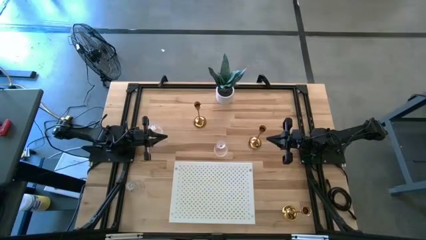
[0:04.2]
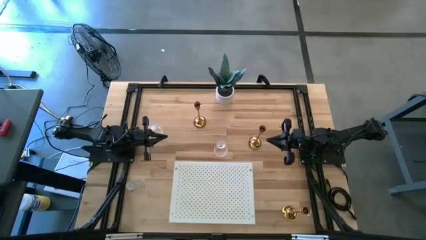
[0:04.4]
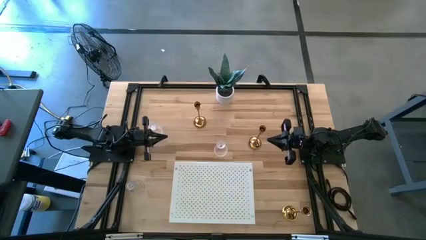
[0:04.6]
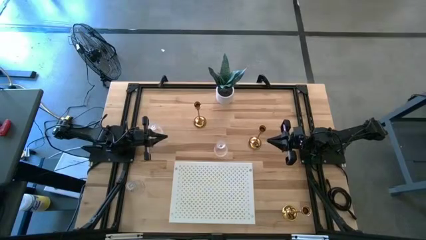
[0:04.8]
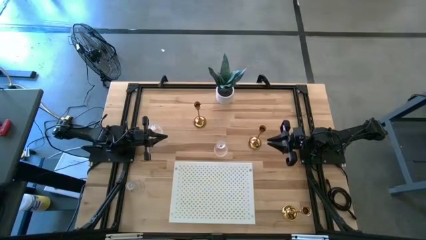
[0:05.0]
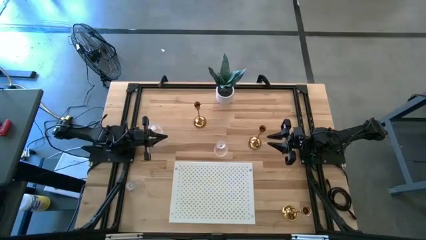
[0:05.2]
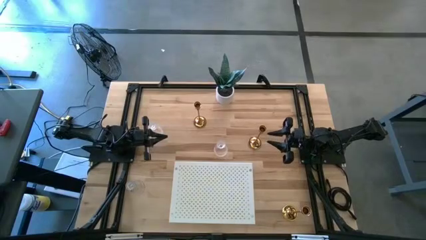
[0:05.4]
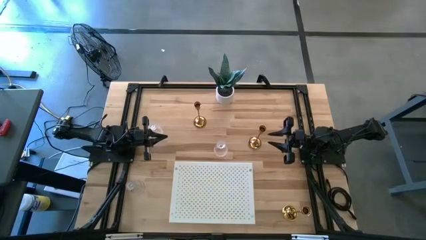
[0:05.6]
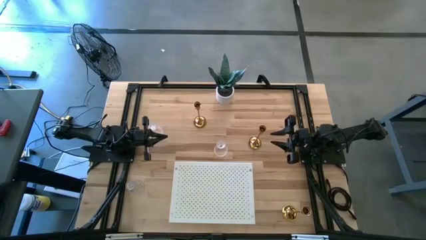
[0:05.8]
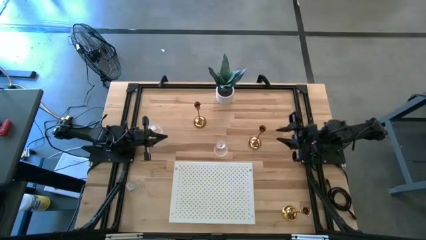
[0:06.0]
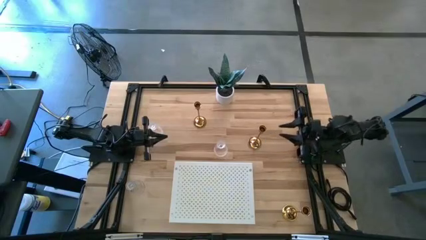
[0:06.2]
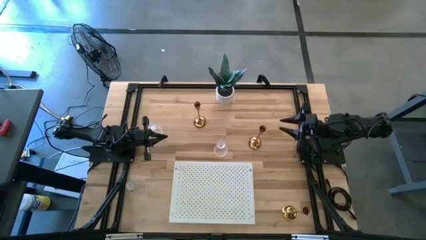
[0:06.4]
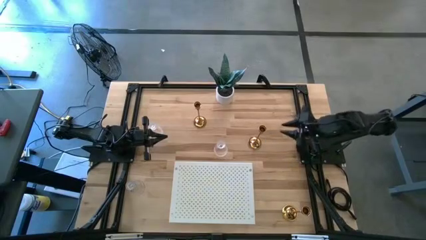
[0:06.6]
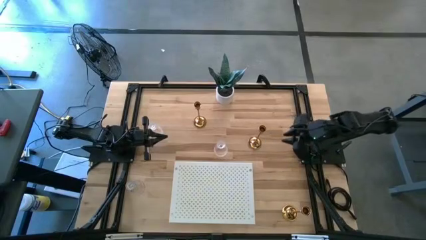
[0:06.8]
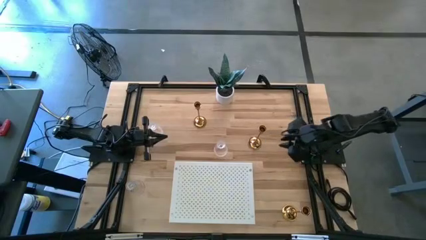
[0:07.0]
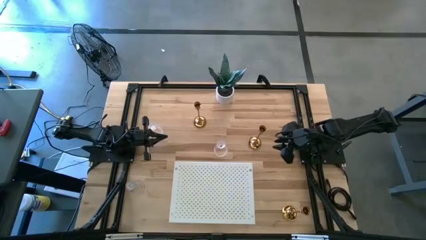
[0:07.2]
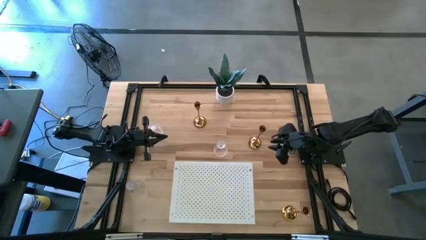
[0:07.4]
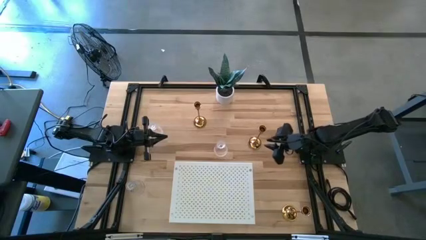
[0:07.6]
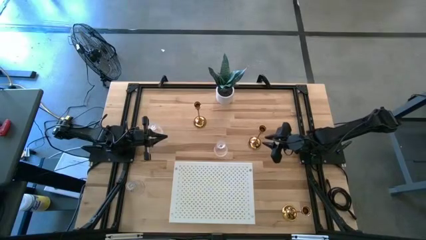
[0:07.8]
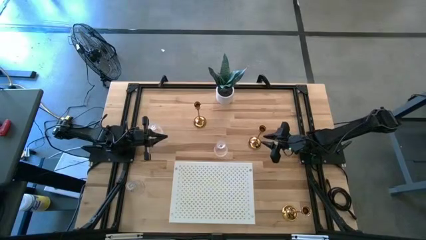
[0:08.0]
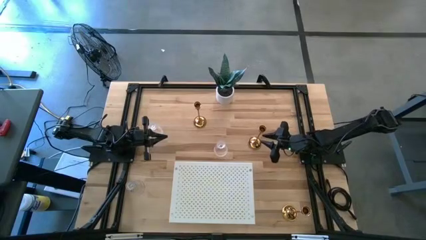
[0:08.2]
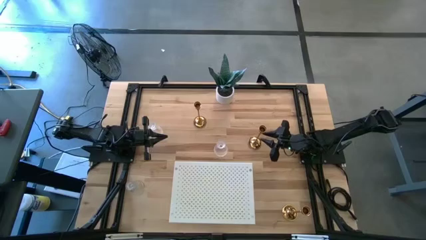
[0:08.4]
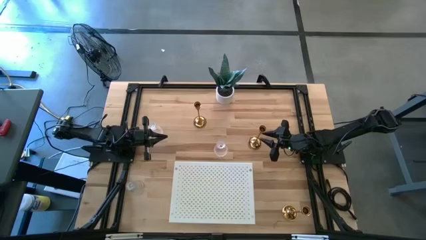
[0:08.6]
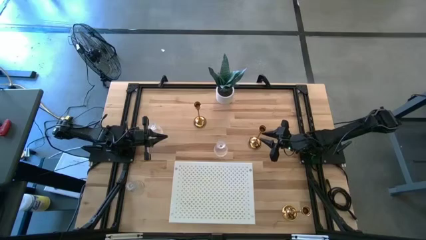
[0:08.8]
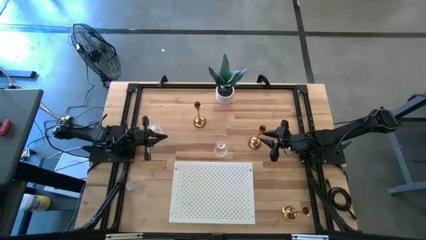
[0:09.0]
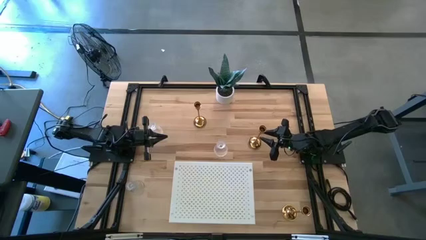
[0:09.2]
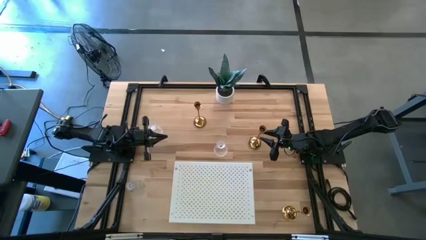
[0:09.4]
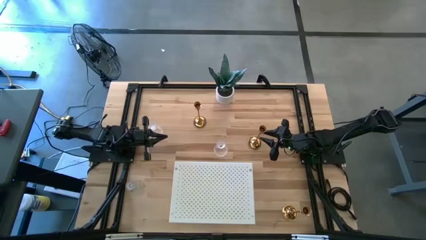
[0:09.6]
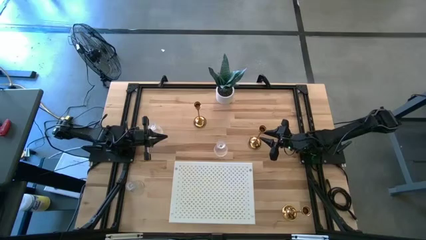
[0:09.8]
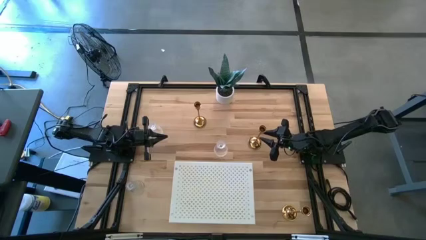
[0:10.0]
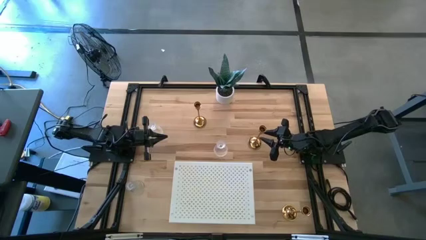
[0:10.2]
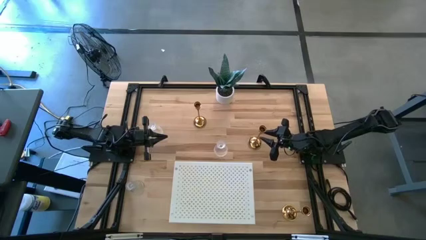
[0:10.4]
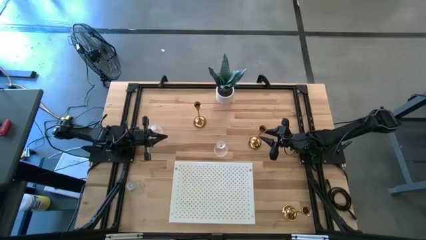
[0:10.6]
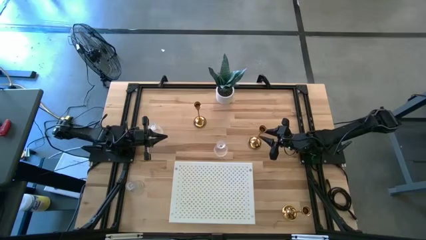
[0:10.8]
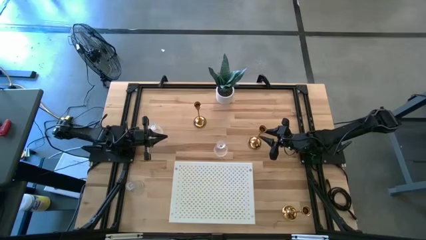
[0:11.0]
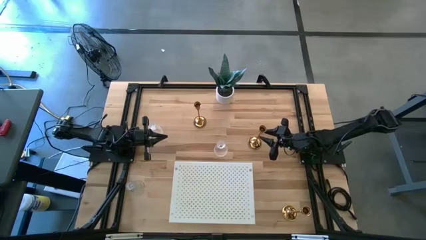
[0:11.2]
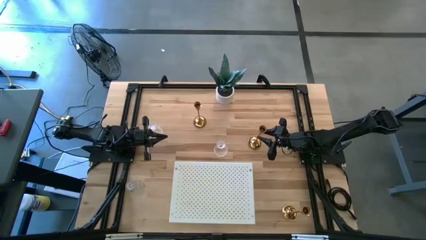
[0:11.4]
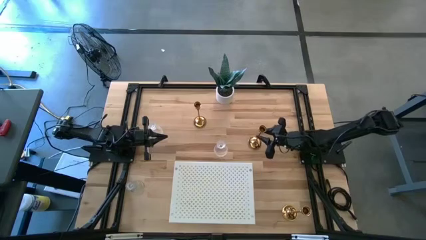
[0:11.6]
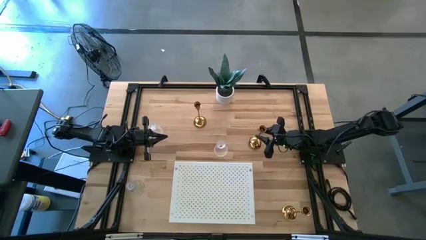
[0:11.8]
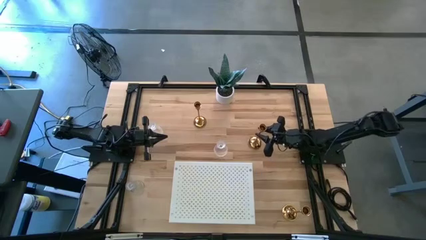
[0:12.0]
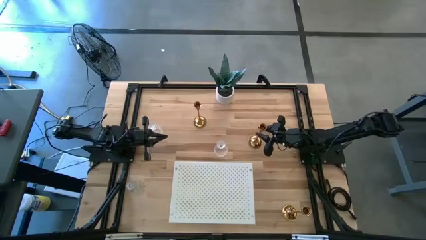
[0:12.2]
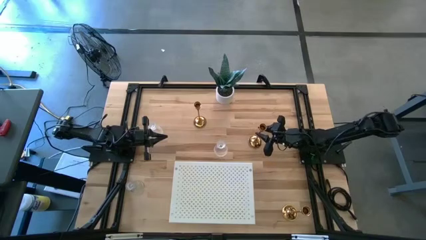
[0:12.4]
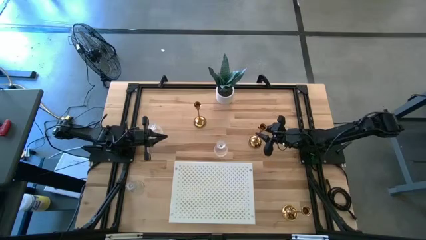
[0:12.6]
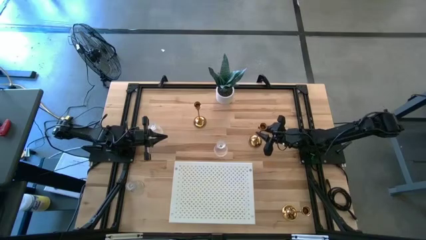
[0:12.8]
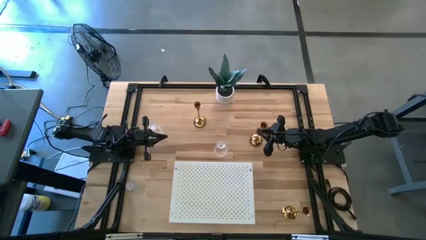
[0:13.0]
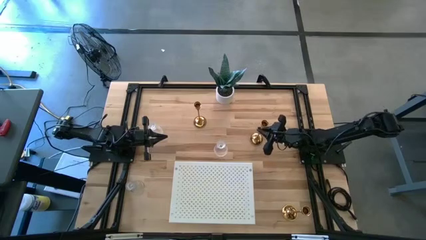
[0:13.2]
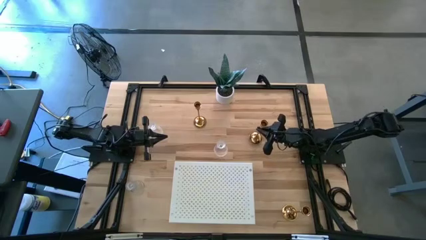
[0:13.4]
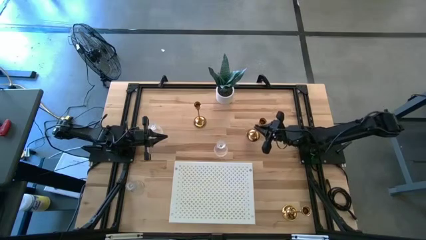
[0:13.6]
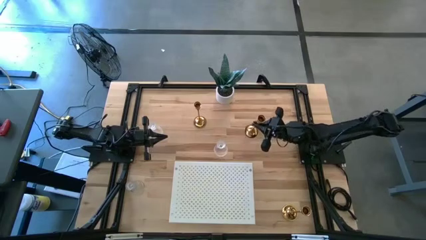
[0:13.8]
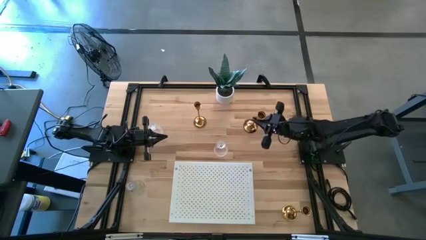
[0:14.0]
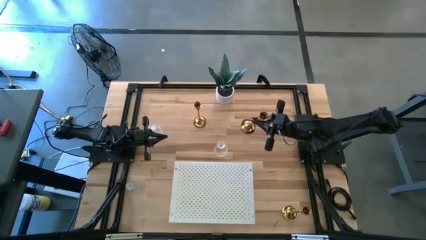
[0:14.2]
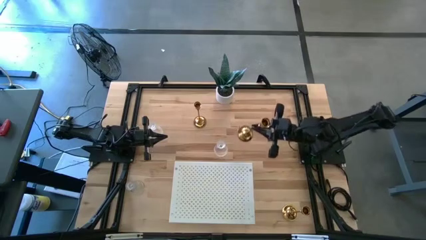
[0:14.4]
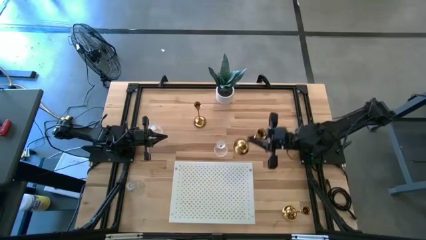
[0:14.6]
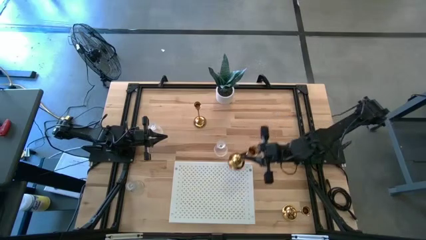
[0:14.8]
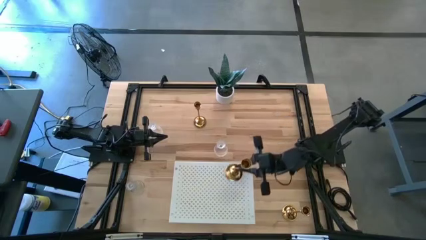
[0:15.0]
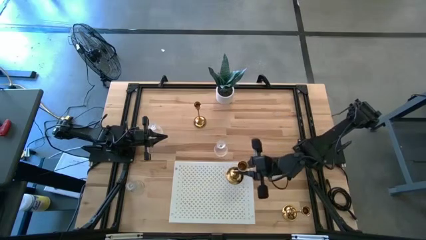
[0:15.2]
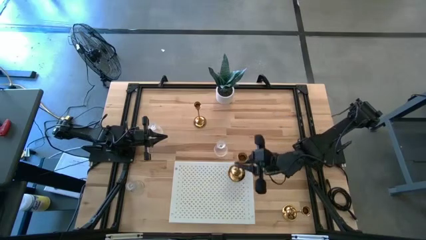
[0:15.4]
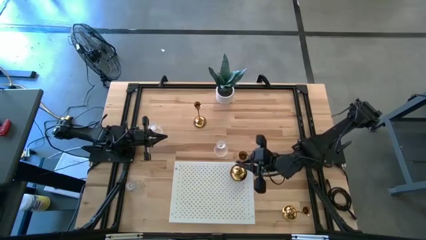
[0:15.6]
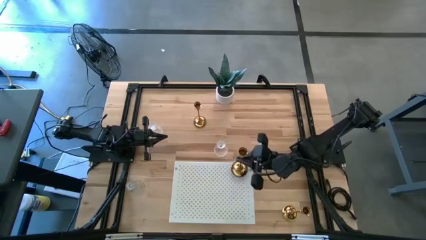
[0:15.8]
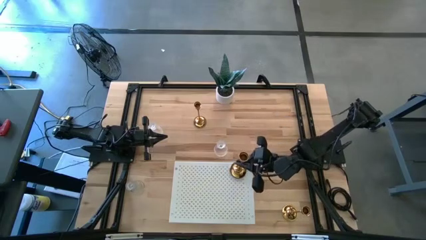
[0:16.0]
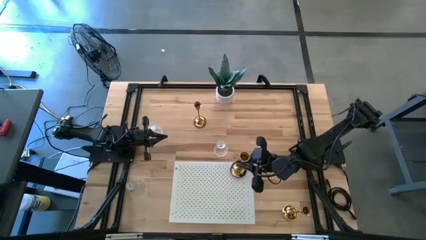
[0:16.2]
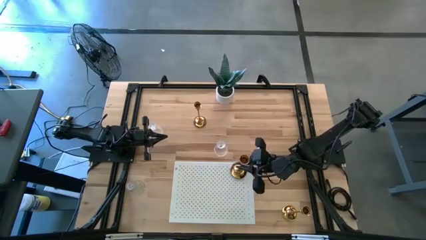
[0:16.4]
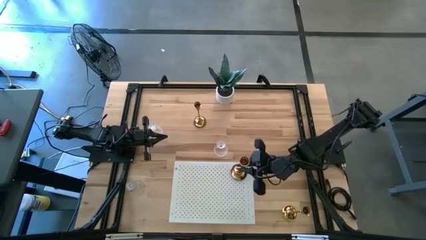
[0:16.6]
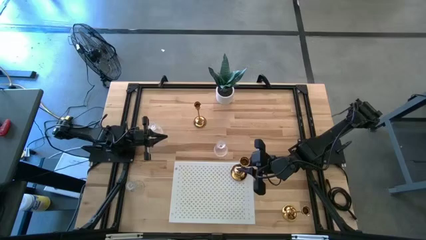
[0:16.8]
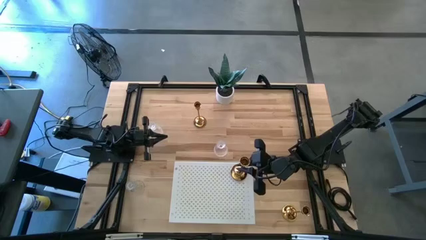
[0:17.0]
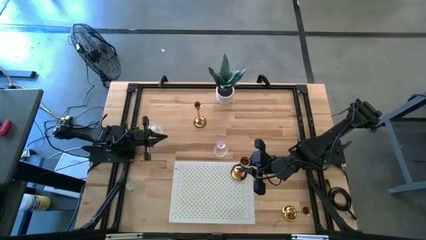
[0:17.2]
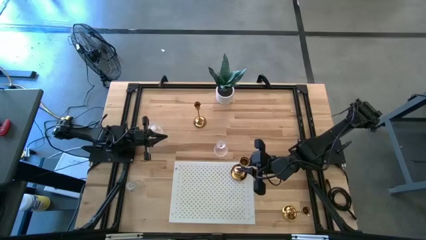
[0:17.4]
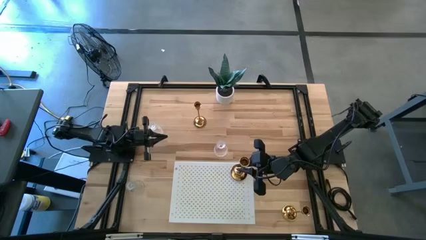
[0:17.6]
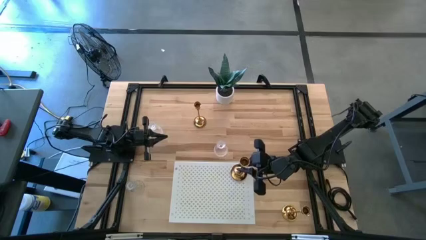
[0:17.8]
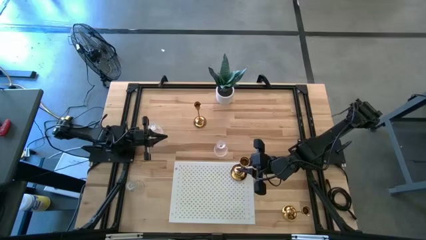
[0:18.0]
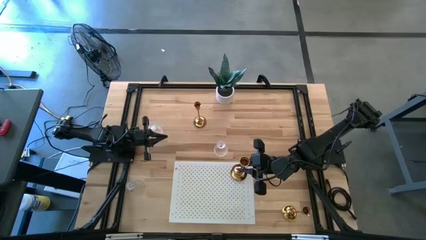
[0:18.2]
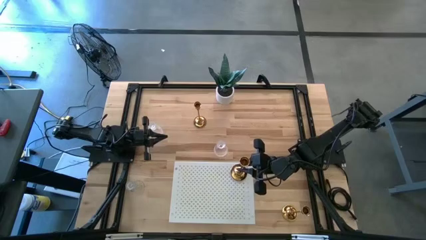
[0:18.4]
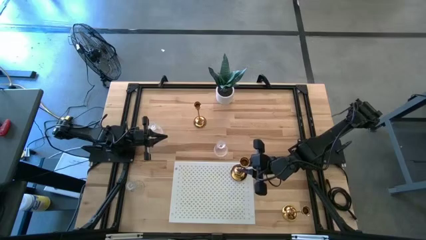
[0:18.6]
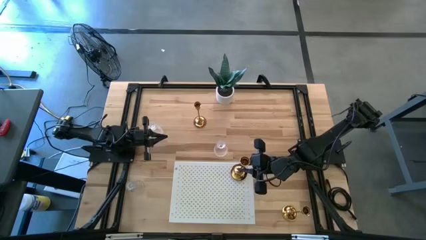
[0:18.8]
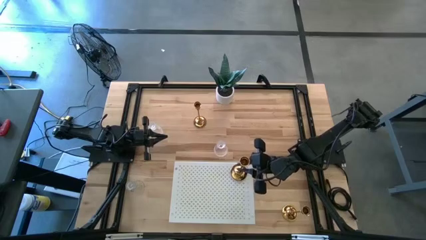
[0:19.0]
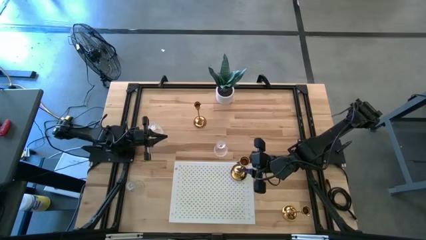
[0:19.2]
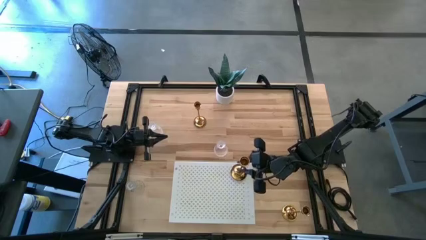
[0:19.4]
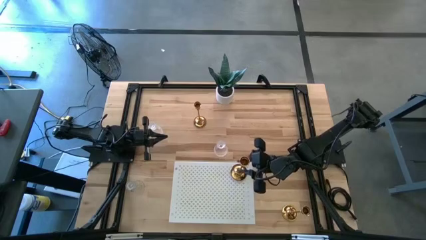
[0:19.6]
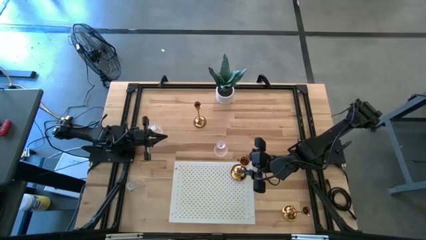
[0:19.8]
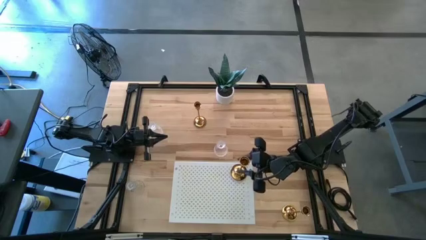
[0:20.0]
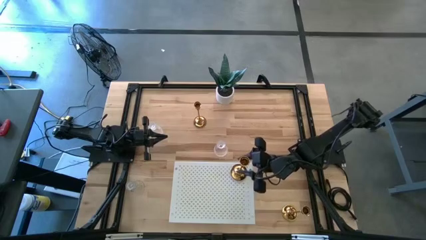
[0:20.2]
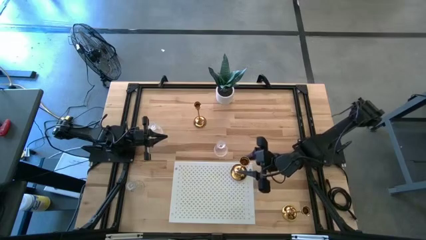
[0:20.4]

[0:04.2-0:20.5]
Task: Pick & Place candle stick holders
Put the middle candle holder on the shelf
